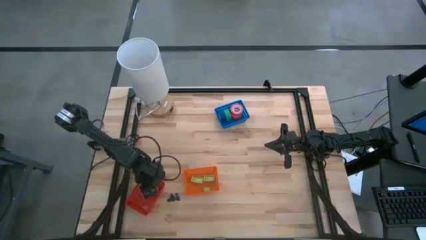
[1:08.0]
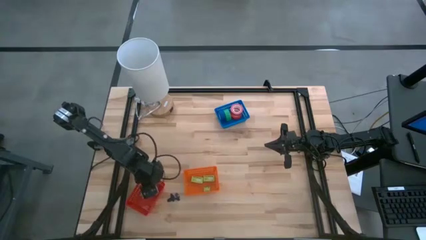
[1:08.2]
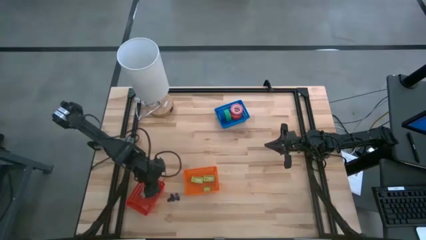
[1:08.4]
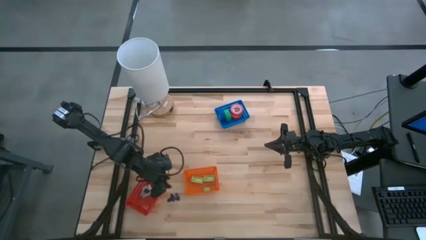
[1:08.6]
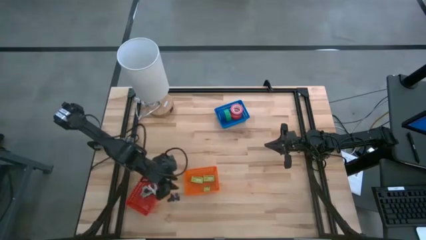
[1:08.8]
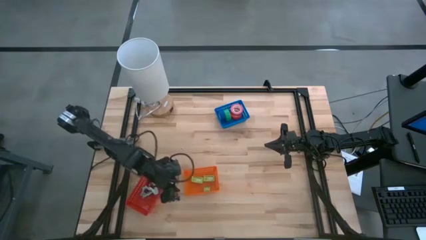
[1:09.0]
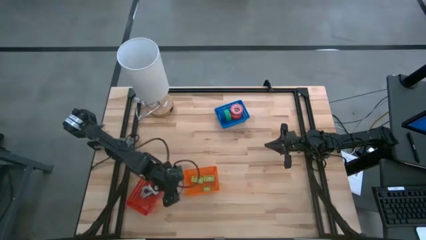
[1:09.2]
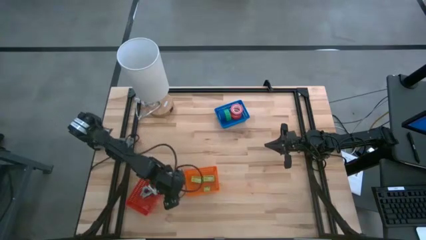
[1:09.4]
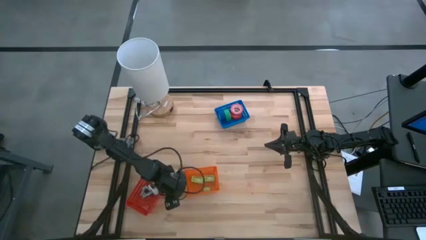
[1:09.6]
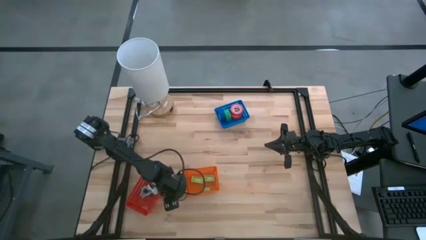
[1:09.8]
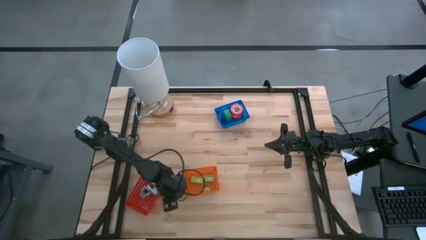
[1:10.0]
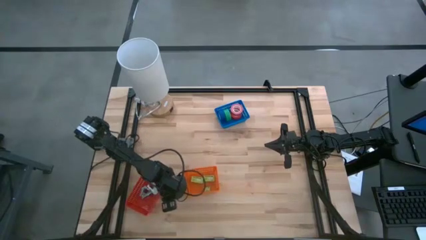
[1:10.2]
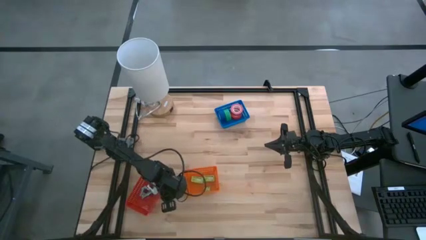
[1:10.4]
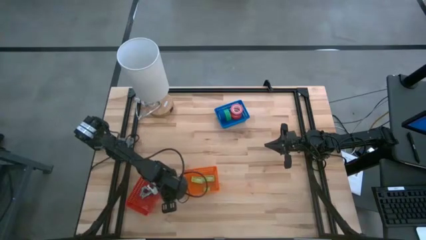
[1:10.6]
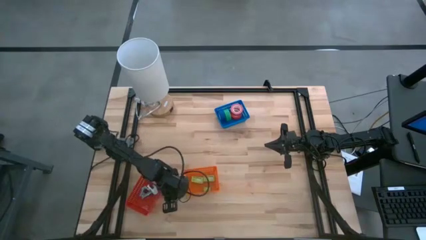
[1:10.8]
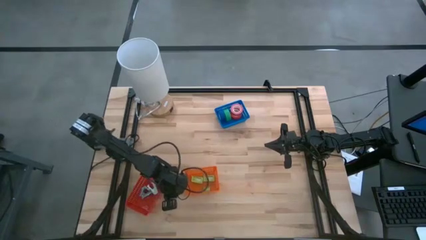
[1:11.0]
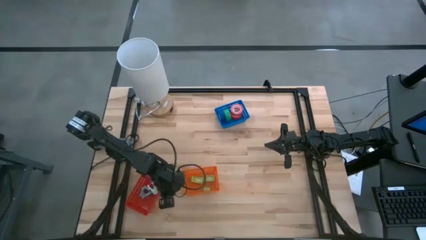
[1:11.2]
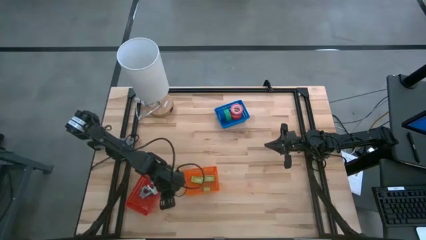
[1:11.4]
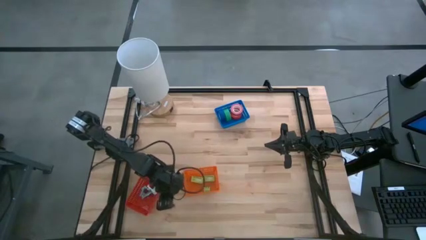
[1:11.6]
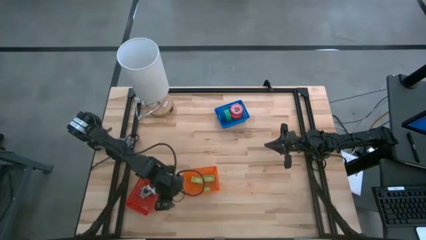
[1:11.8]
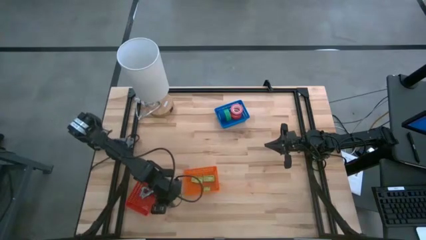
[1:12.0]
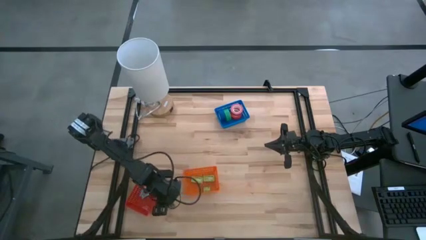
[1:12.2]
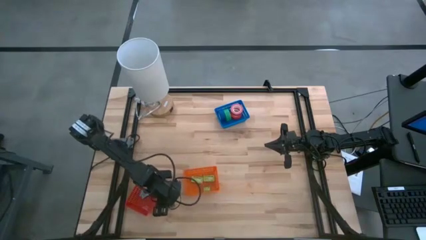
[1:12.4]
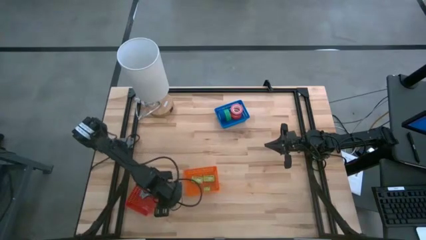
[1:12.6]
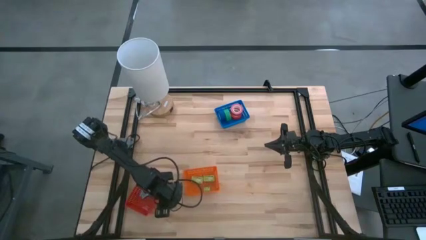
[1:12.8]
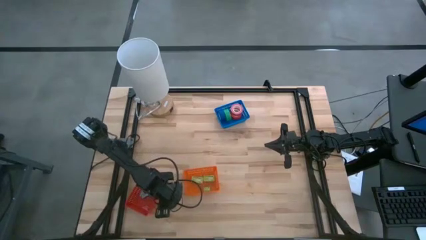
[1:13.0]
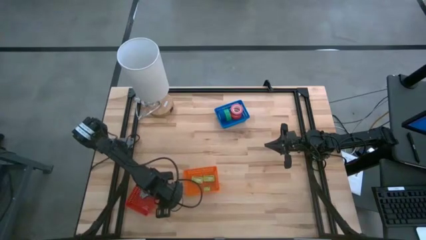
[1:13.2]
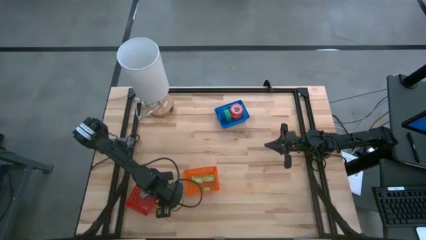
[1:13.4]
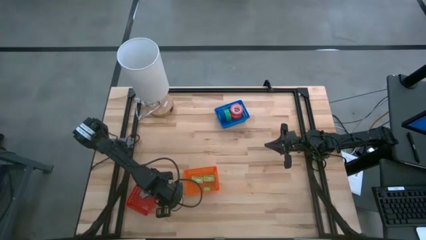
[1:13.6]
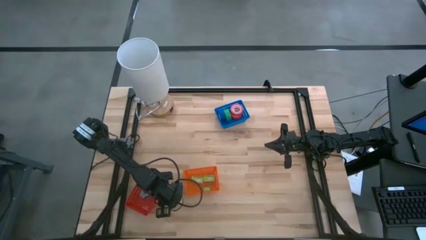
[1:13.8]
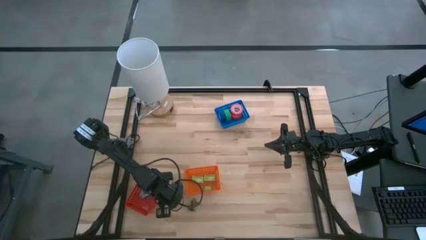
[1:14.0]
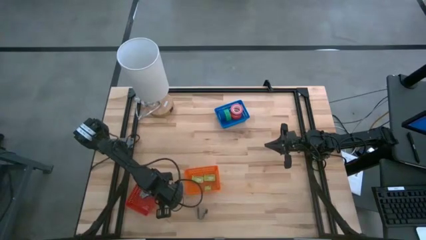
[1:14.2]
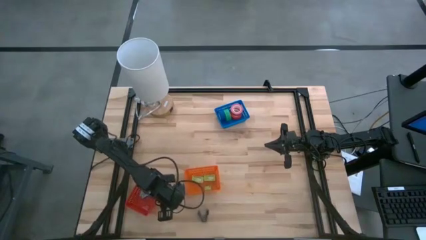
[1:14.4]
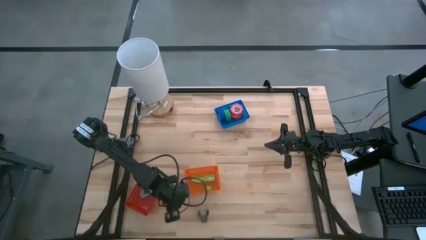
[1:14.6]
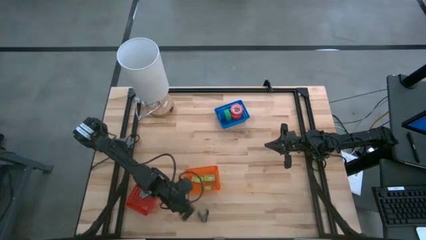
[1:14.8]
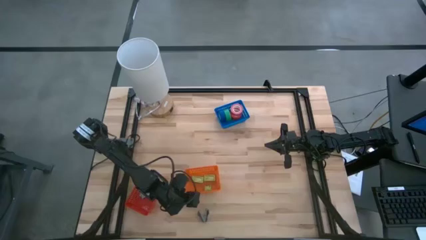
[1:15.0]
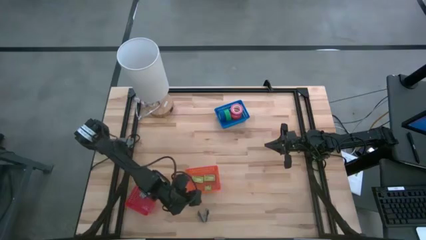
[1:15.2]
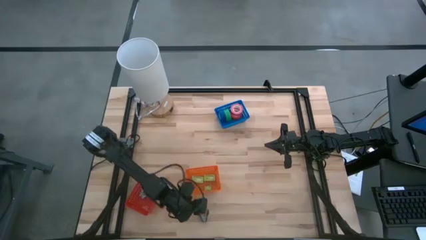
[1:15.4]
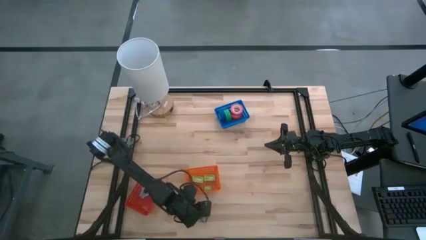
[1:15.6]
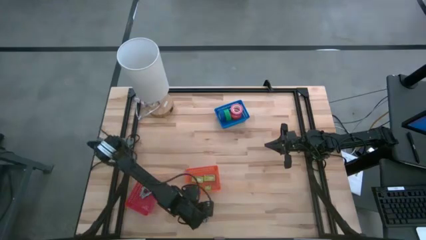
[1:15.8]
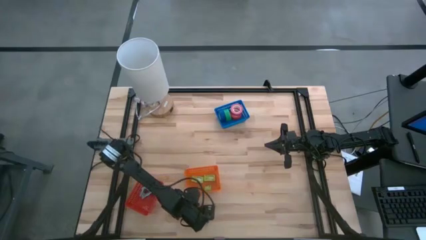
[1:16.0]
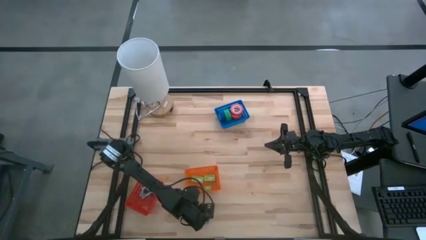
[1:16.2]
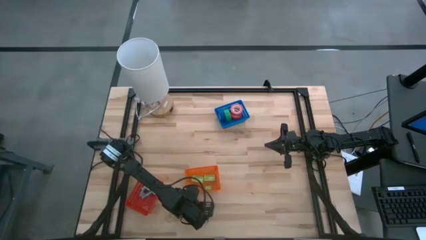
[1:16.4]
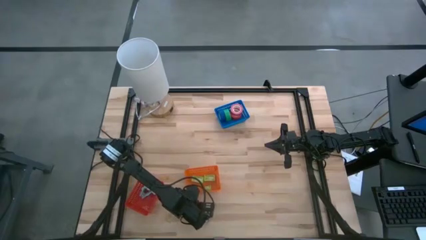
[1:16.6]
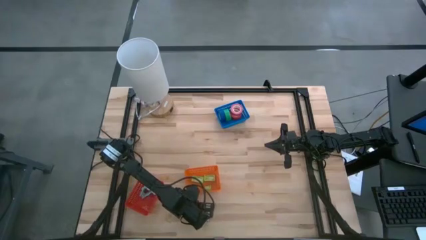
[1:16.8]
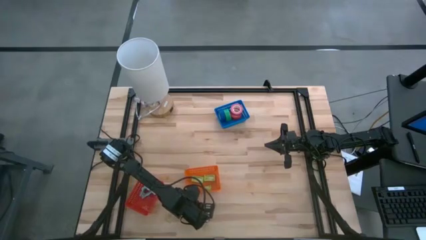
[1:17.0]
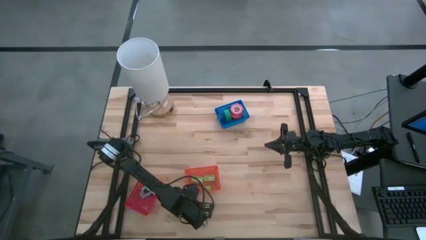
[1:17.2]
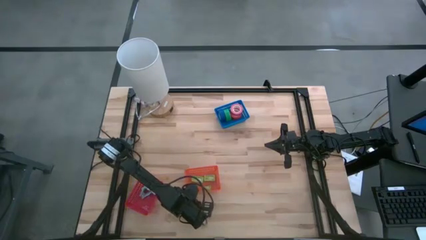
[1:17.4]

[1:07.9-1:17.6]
Task: Pick and place Stapler, Stapler remover, tape
Put the black staple remover into the red bin

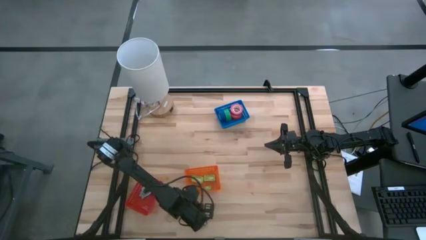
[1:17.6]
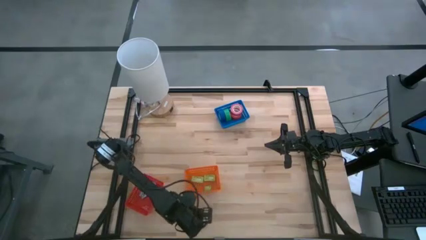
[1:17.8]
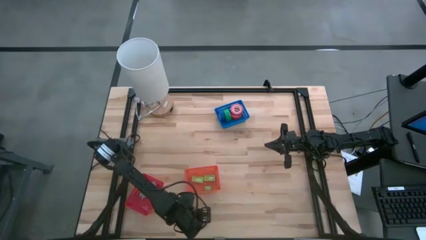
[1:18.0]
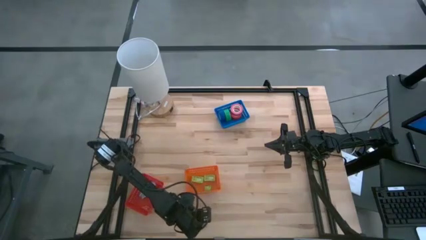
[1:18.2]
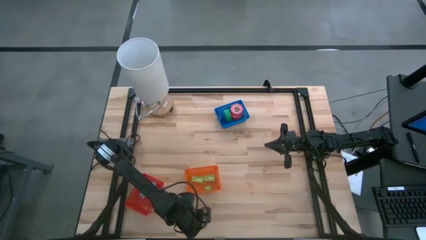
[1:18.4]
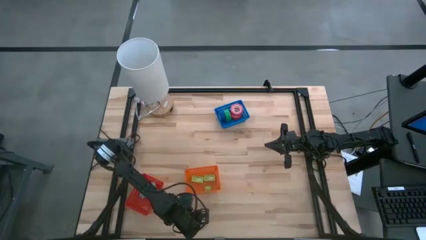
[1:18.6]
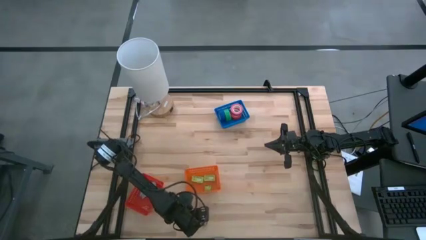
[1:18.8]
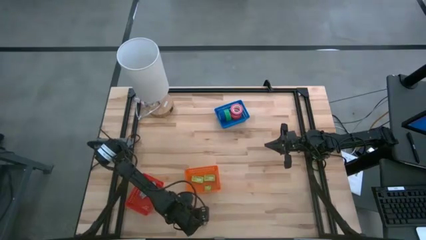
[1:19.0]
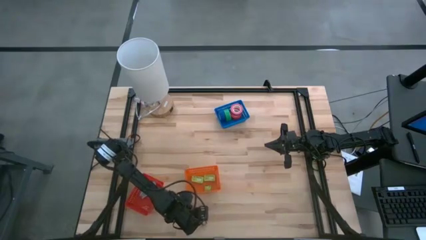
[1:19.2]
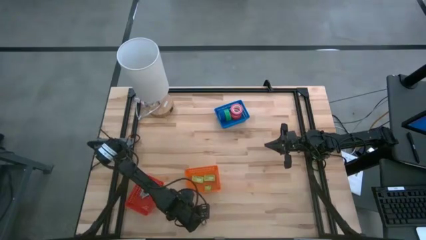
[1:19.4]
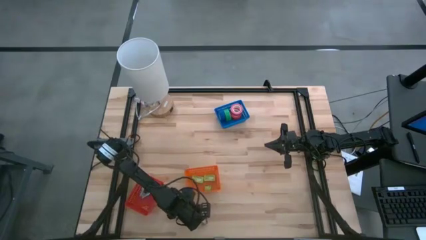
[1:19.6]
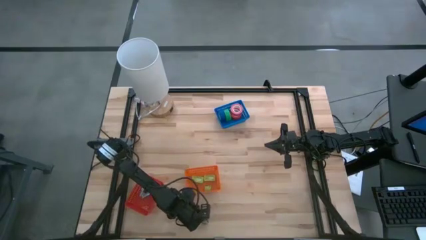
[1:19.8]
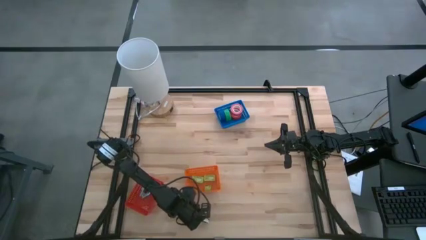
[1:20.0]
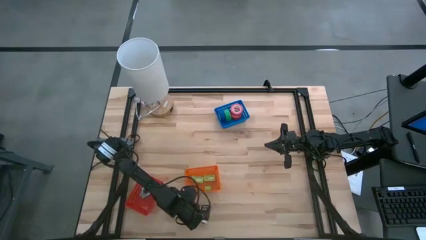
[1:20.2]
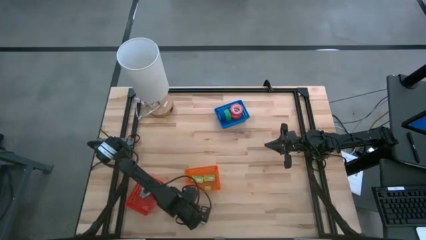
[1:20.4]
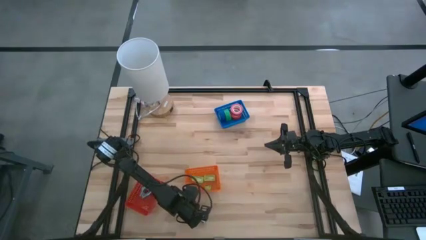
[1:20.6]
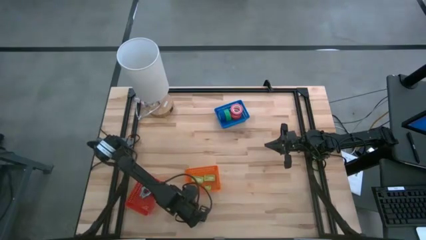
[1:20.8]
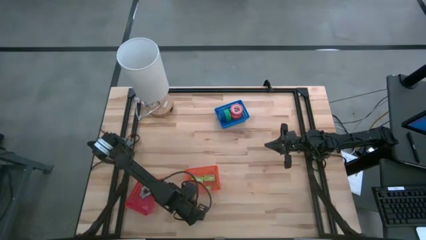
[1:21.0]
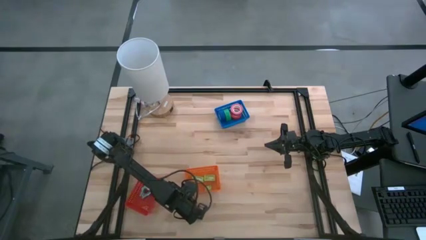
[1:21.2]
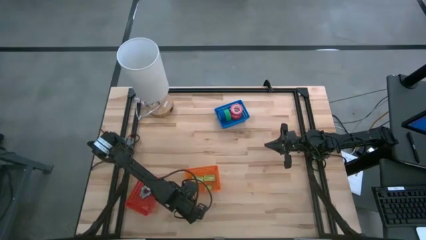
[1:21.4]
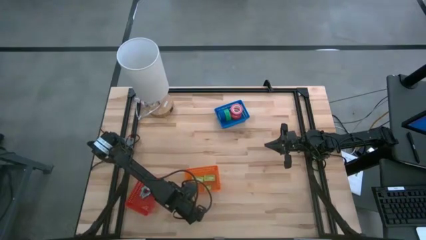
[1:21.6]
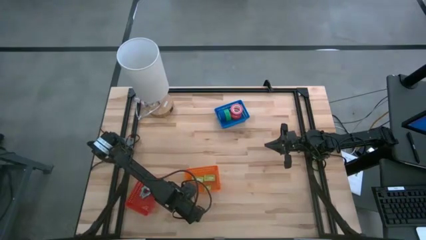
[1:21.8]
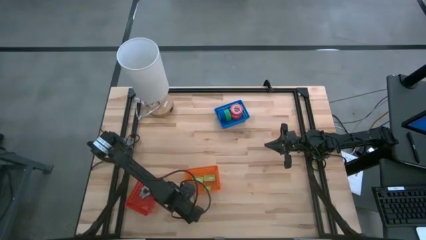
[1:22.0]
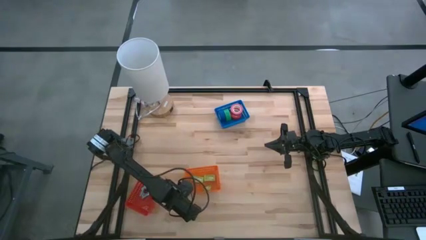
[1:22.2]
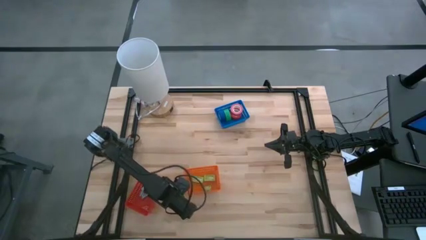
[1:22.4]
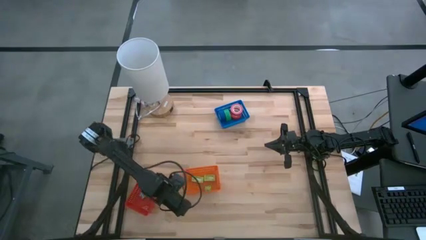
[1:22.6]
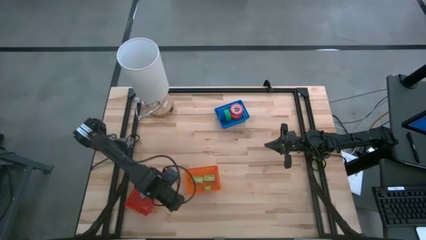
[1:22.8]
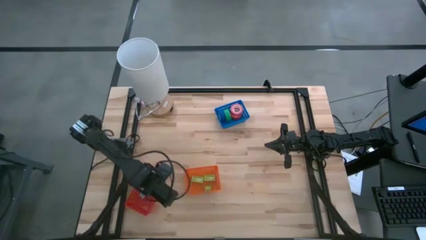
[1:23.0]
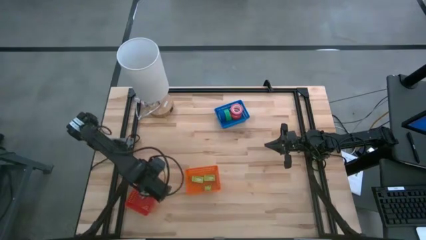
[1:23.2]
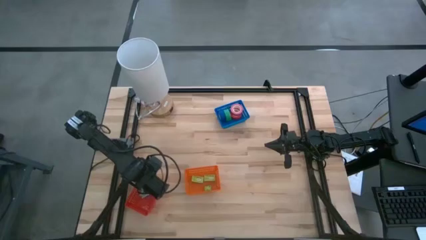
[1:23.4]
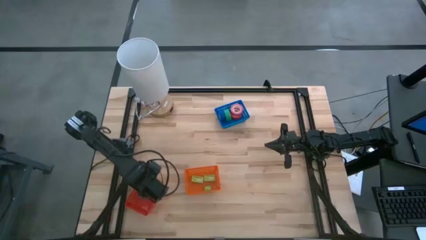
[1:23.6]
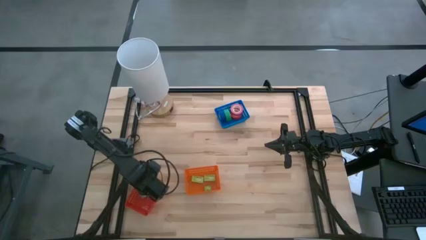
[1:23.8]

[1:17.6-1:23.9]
Put the black staple remover into the red bin

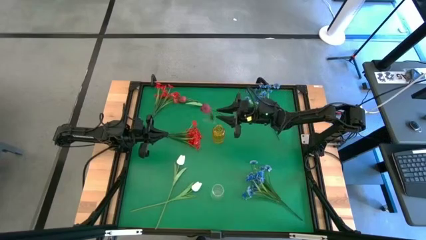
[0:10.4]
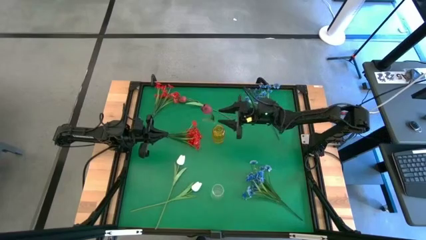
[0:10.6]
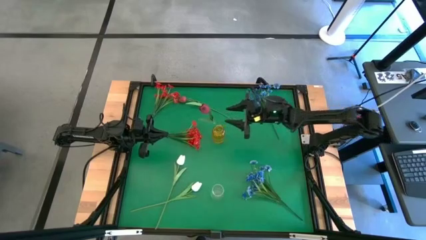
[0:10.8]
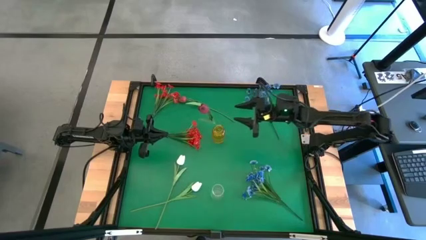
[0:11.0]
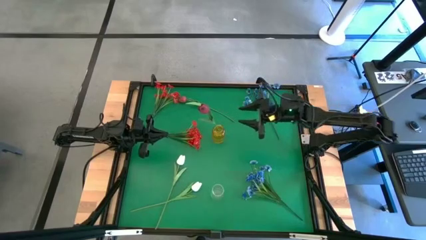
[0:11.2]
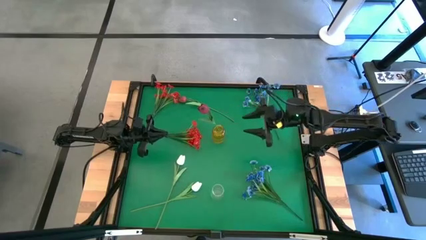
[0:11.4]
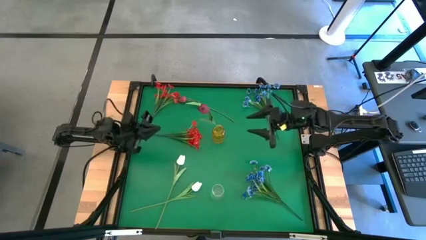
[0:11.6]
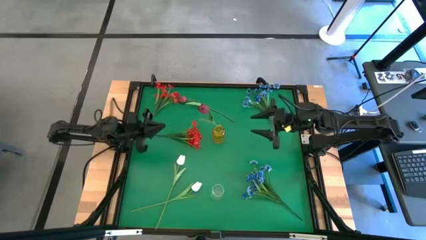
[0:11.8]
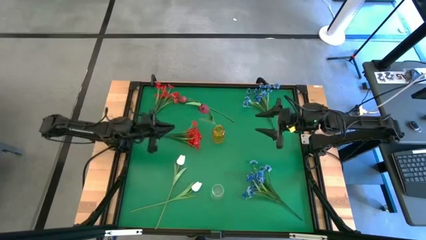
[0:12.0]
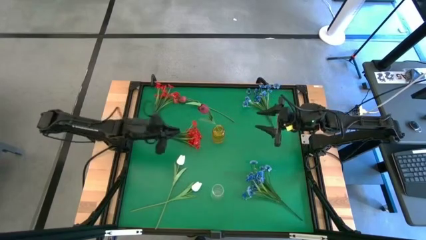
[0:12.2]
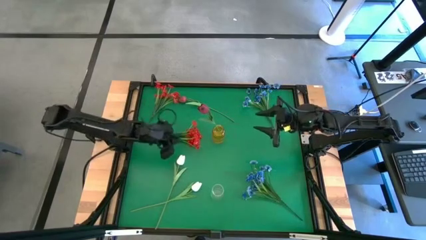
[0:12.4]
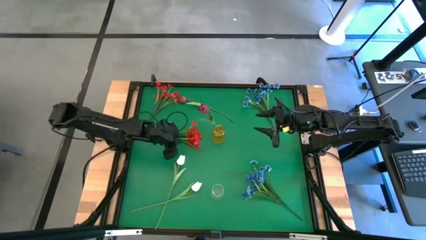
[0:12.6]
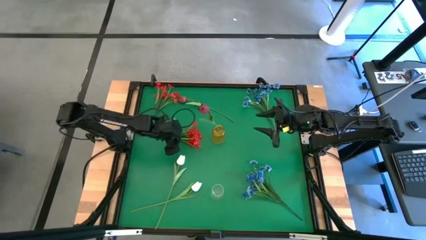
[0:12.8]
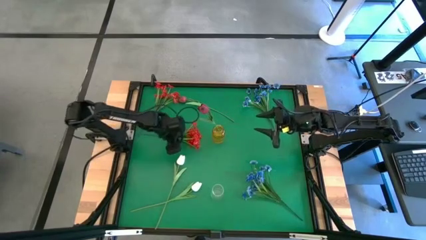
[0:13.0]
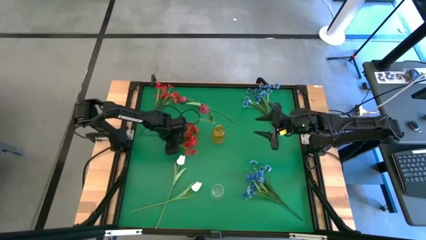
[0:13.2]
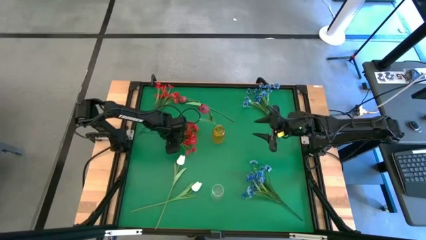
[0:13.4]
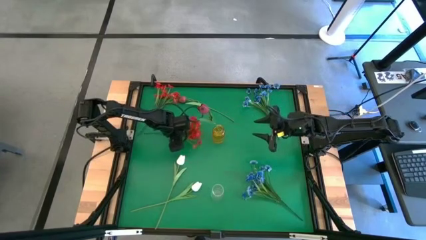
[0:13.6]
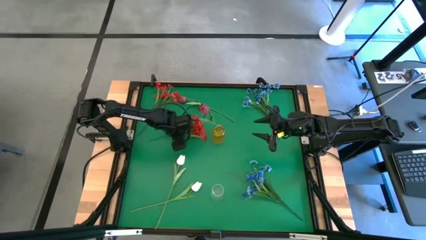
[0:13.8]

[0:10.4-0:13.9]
Task: Sort flowers into vase by color
Put the bottom orange flowers into the yellow vase
